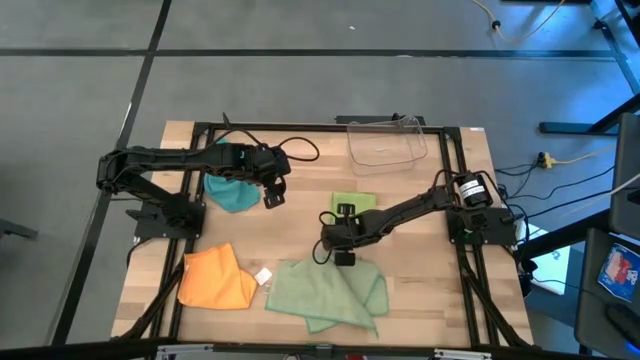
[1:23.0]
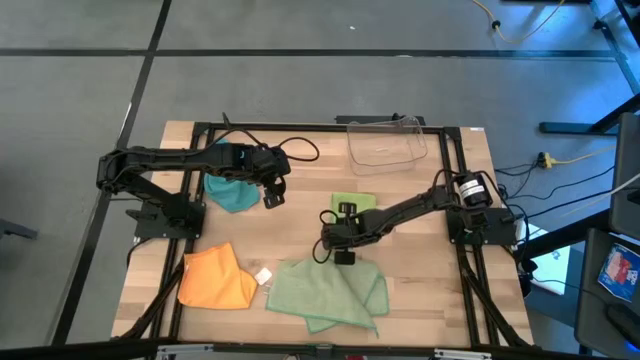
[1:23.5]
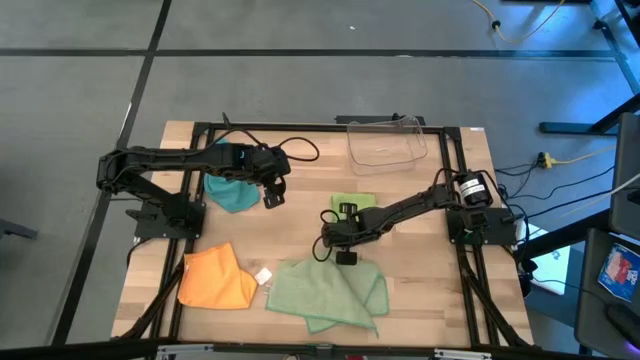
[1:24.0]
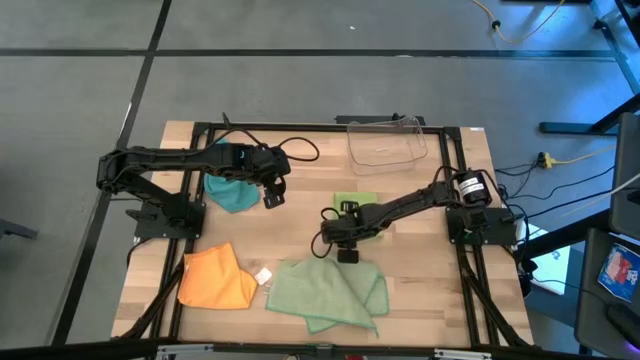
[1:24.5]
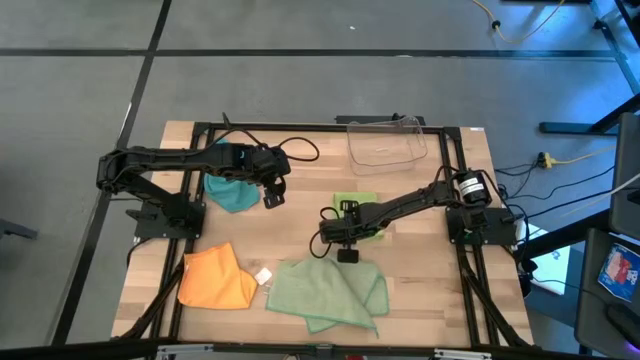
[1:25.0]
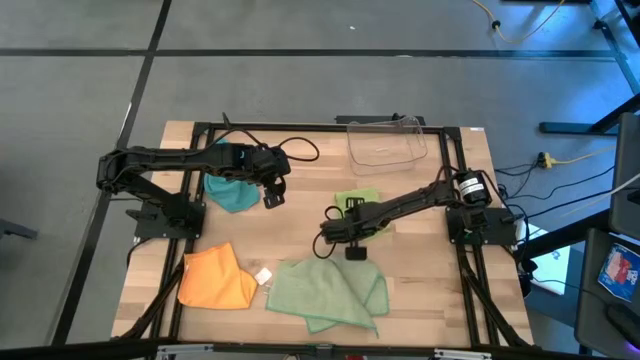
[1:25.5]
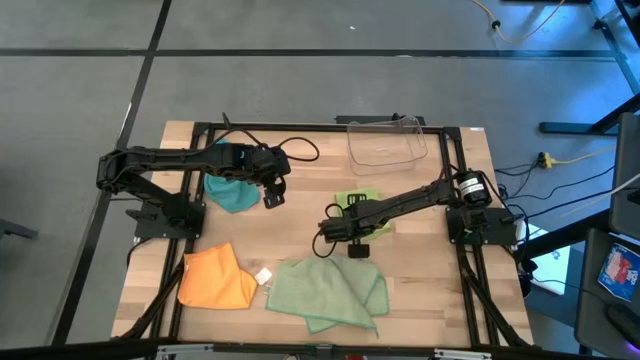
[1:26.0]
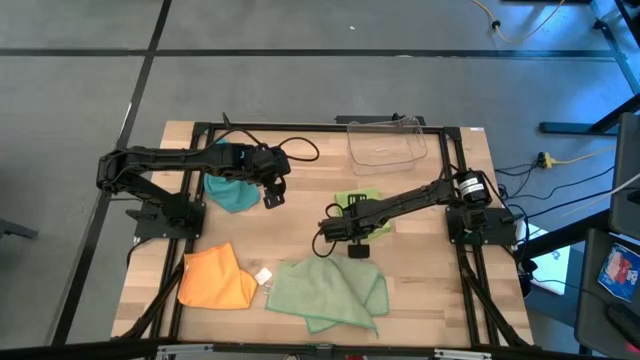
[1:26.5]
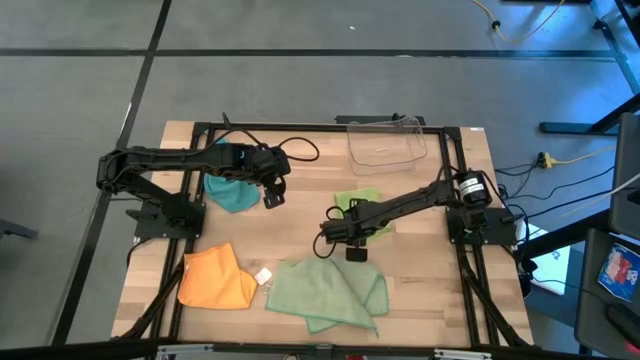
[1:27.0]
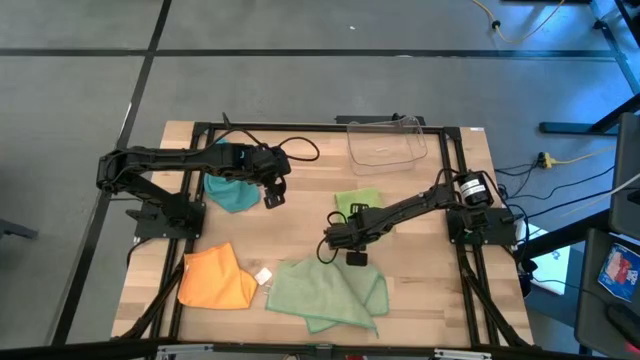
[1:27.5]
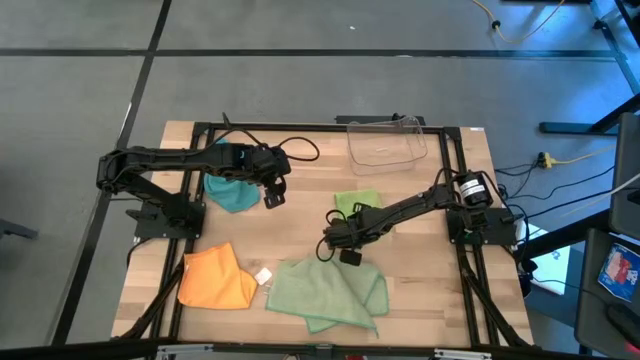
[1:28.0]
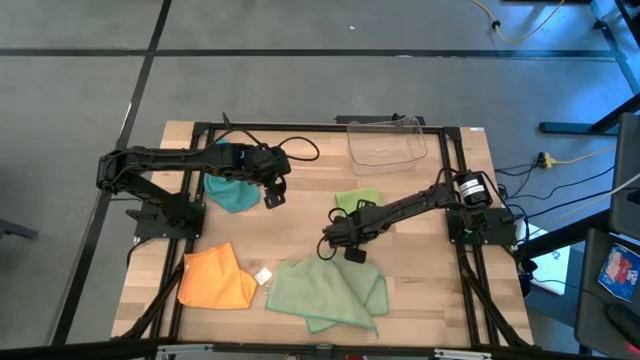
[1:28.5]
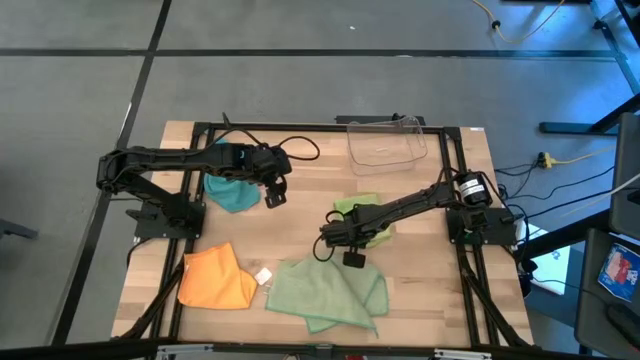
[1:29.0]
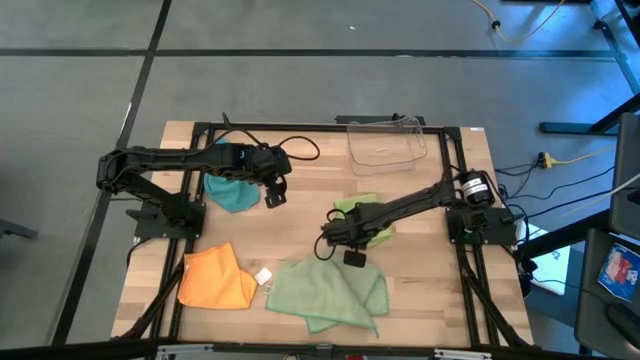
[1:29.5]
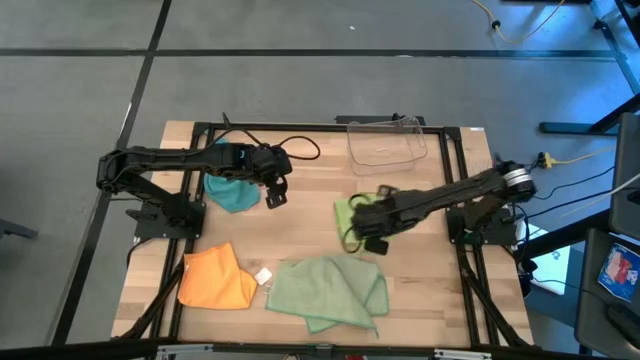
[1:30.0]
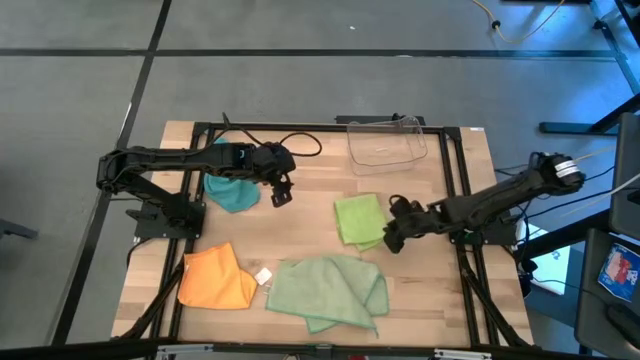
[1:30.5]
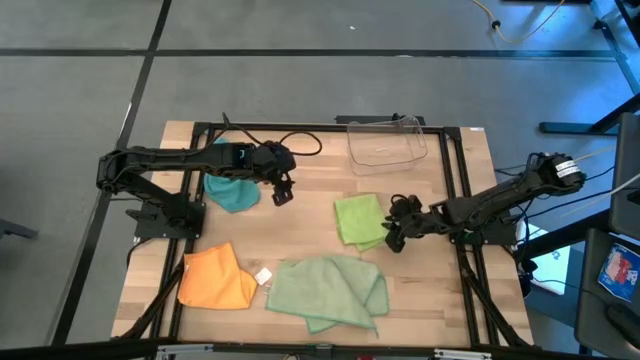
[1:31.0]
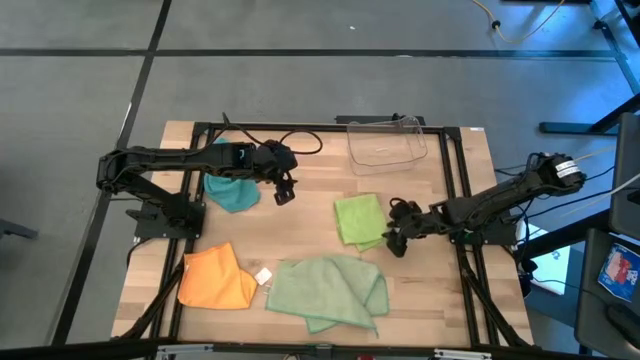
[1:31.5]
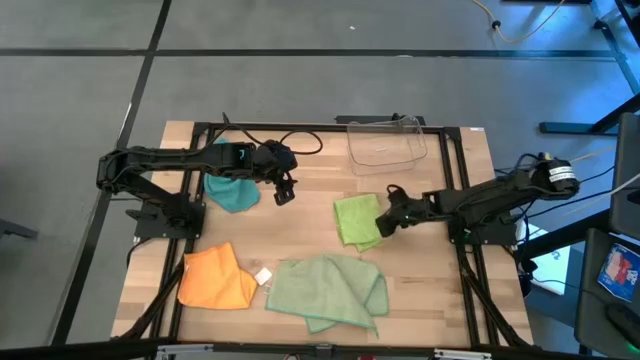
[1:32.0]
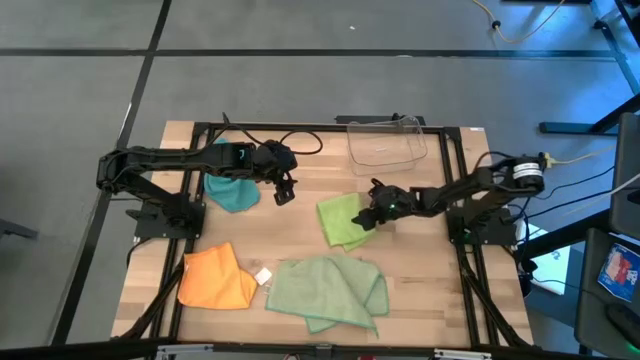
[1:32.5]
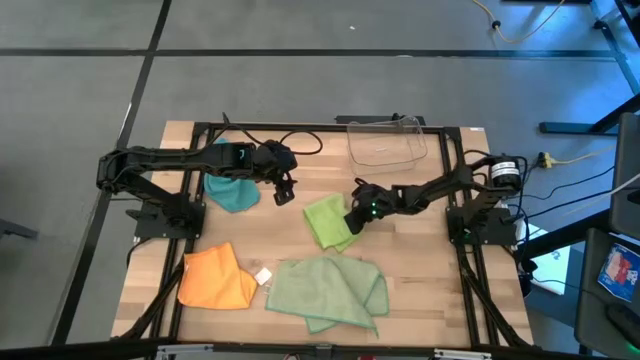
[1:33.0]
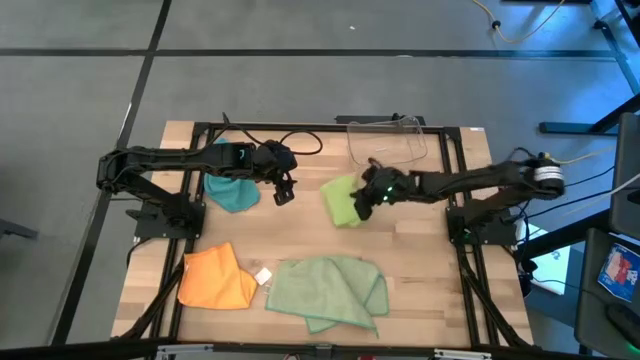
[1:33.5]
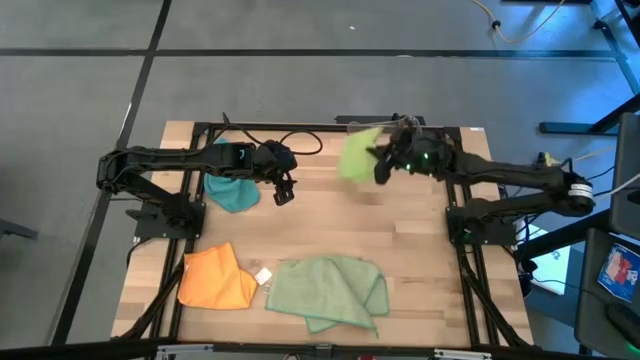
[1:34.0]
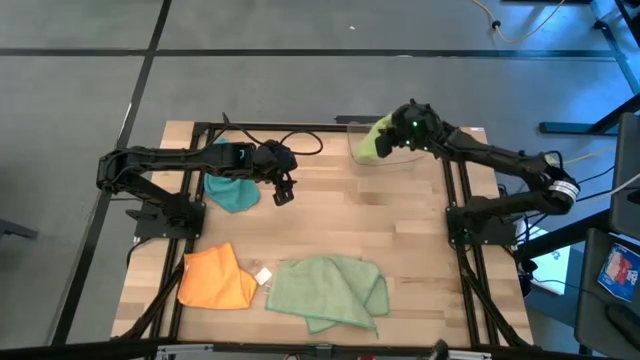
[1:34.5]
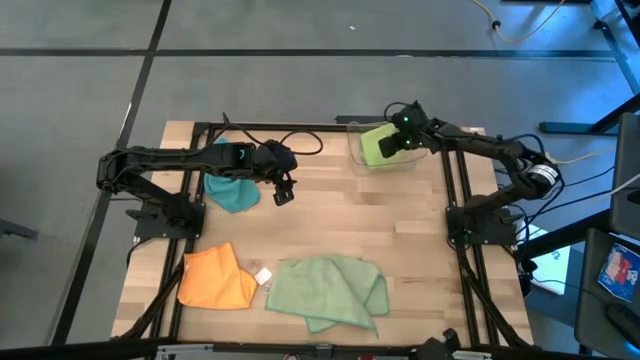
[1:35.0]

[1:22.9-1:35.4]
Task: Fold microfiber towels
Put the light green microfiber towel in the transparent bin

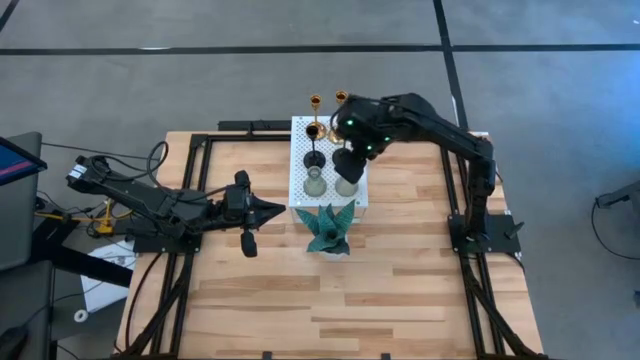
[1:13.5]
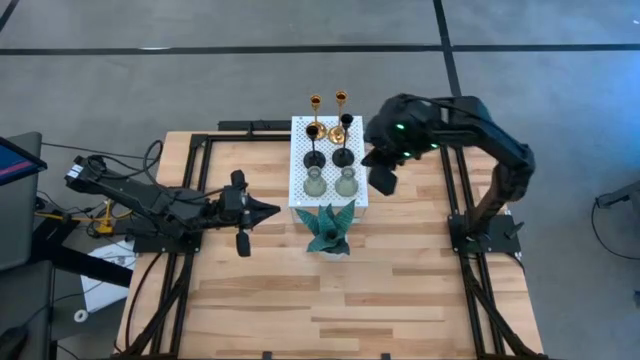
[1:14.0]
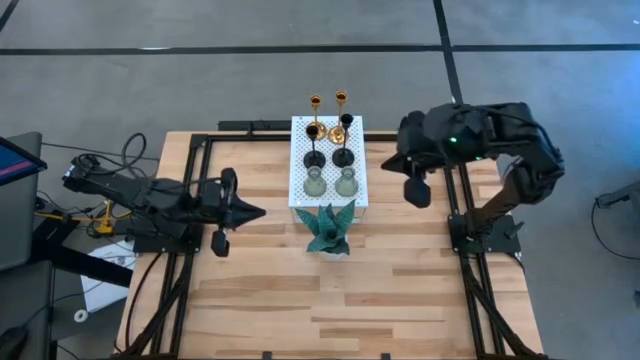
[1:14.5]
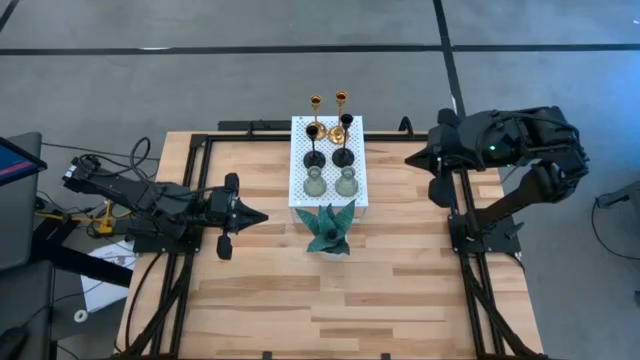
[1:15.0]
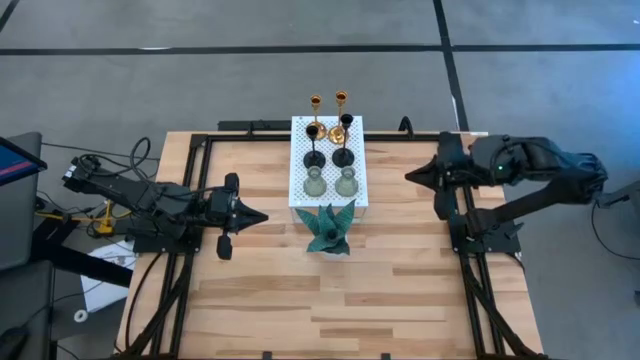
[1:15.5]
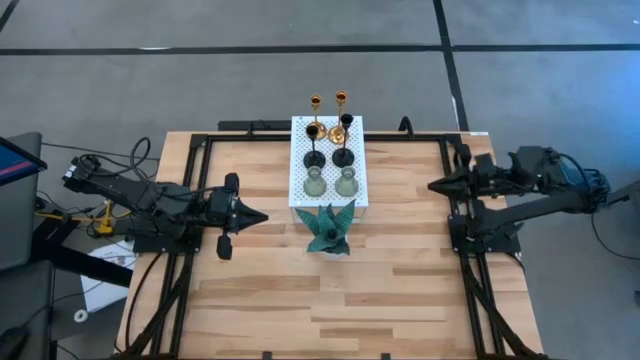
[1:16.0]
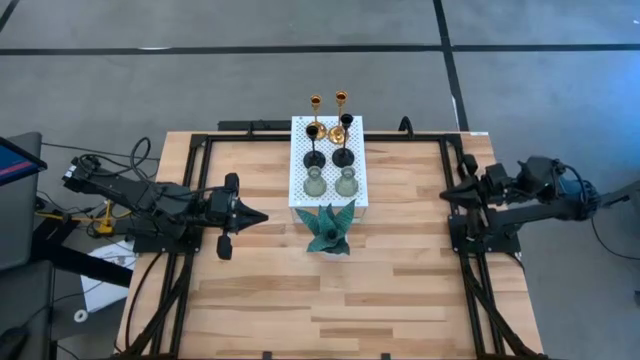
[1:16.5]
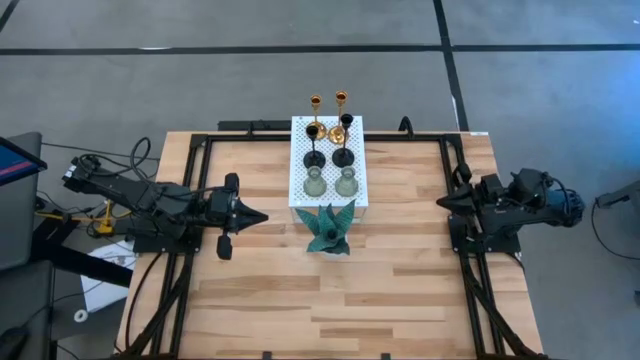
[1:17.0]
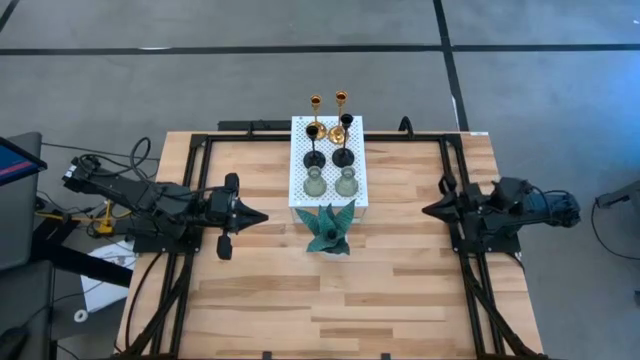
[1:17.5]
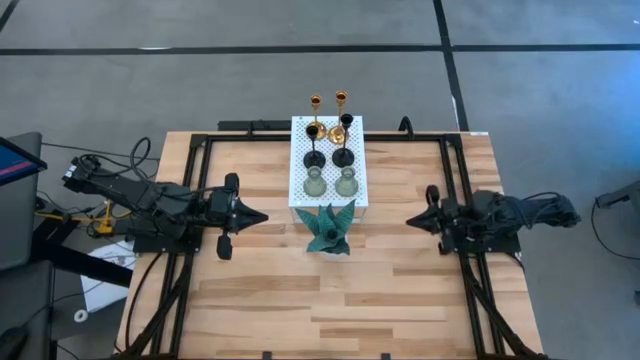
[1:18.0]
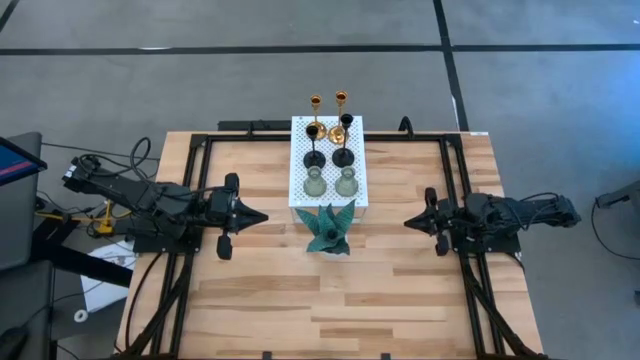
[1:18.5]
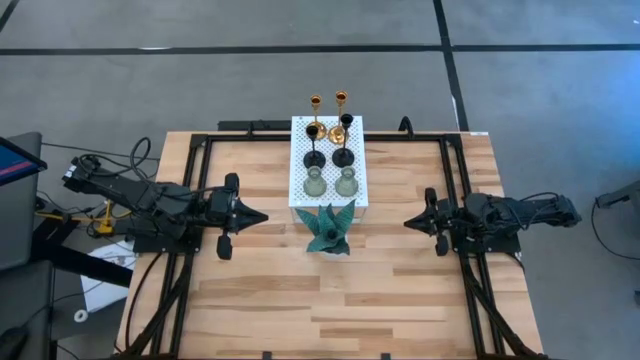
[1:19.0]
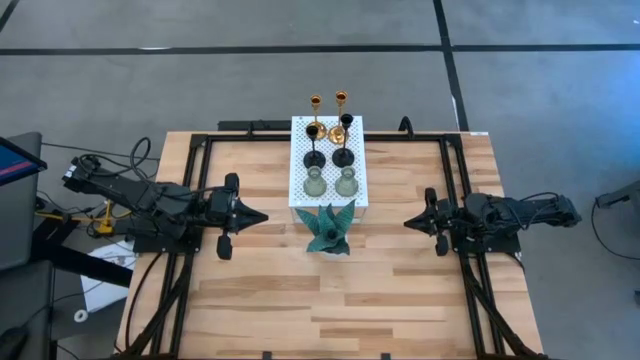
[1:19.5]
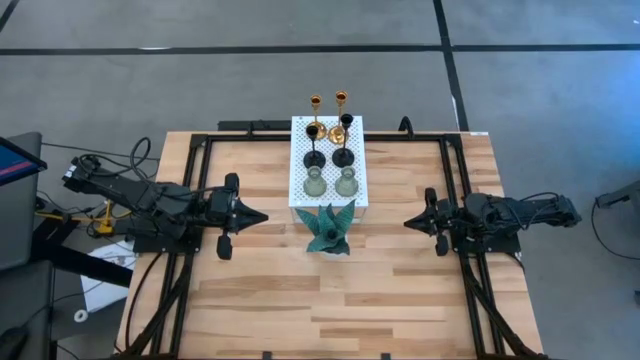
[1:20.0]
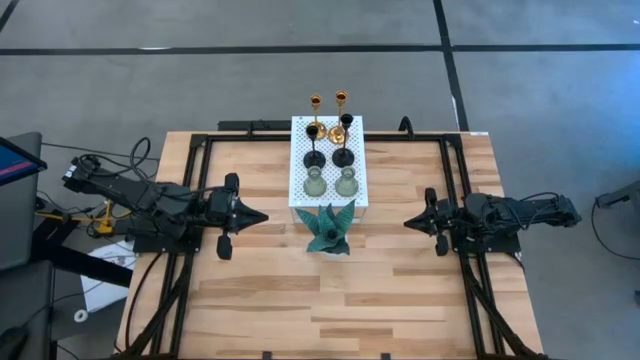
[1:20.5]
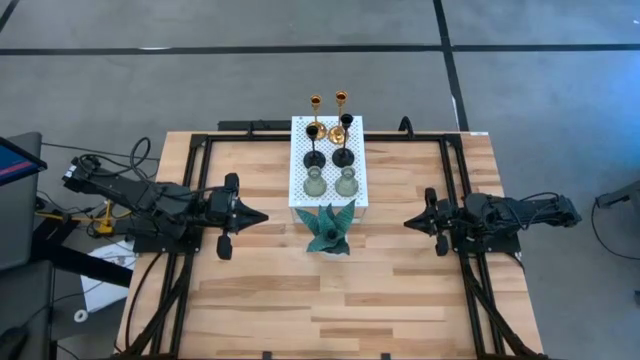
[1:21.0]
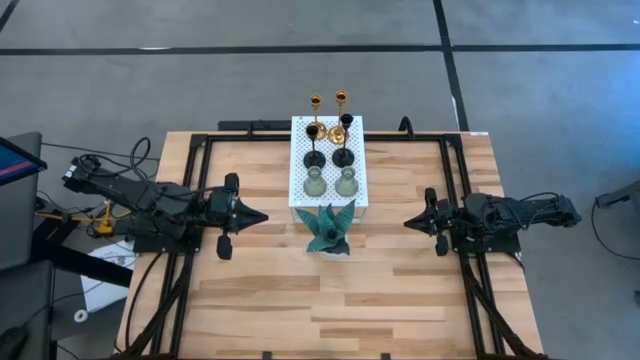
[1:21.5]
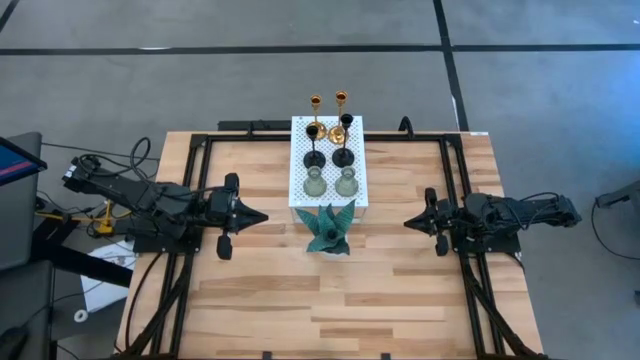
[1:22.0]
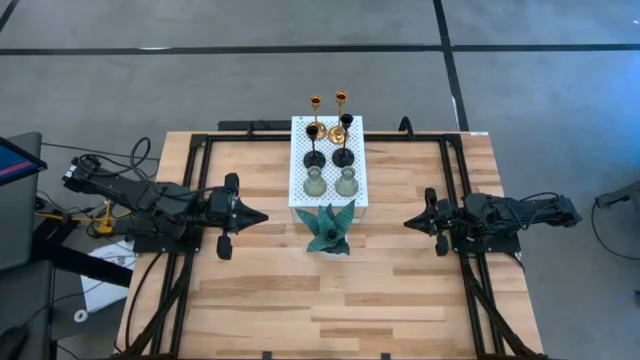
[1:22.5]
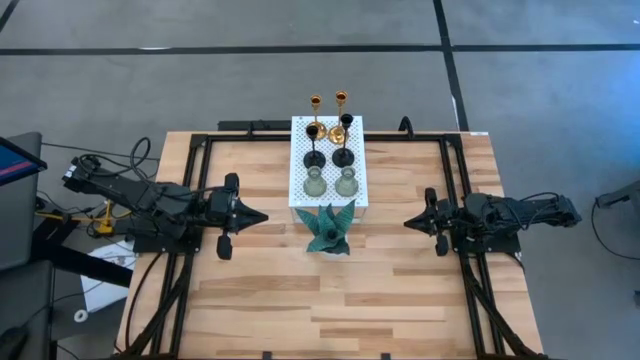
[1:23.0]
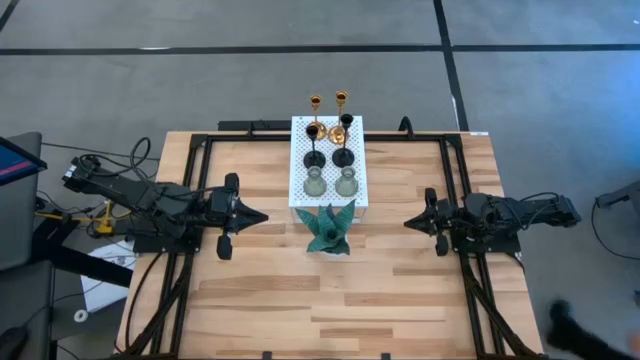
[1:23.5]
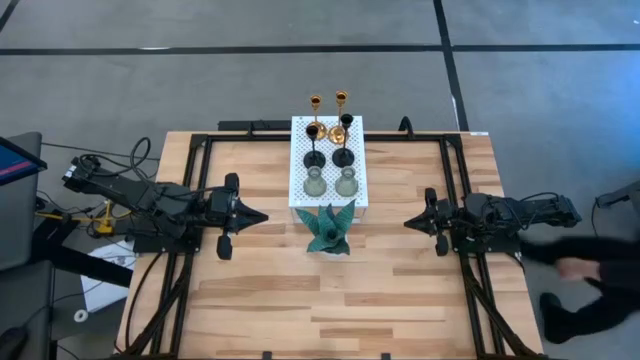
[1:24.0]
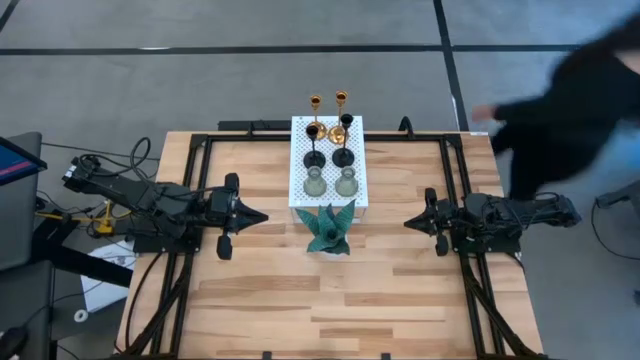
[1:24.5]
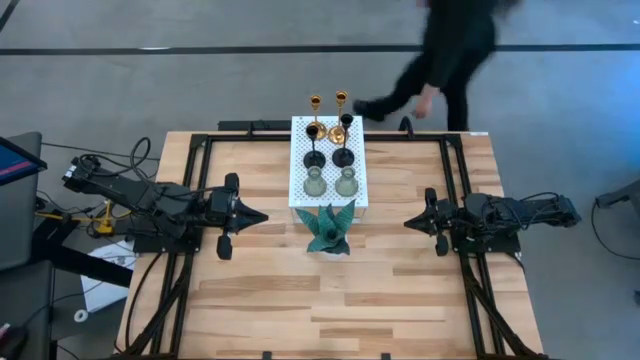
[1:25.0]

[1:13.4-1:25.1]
Task: Pick & Place candle stick holders
Return to Home Position
